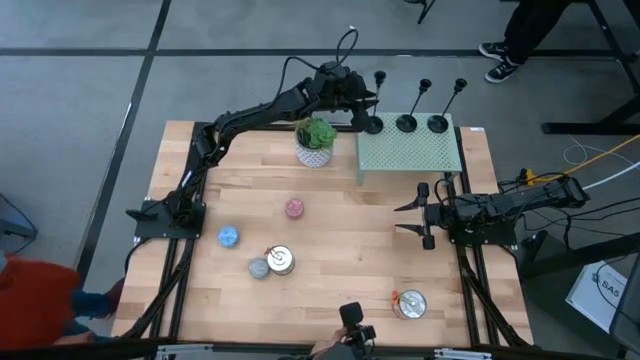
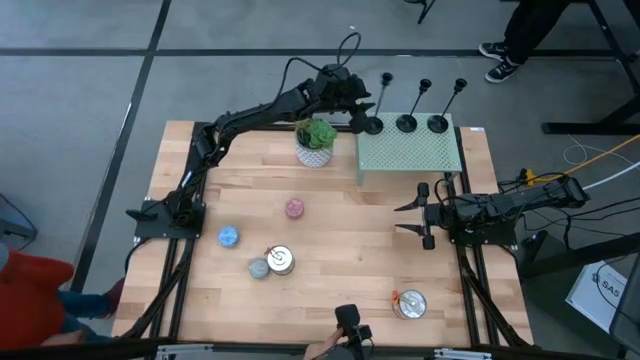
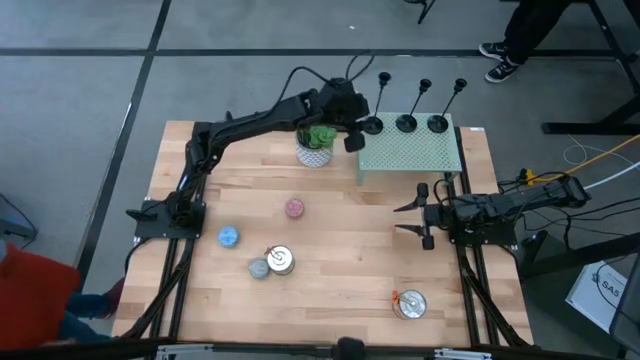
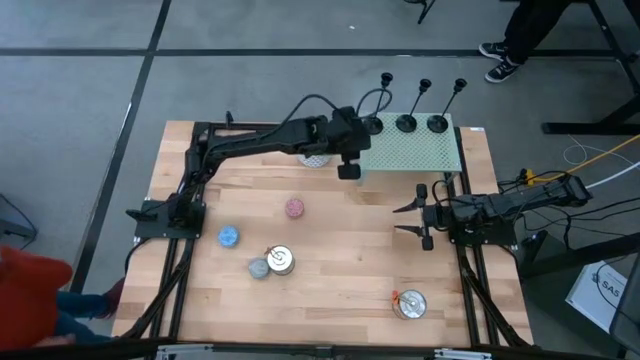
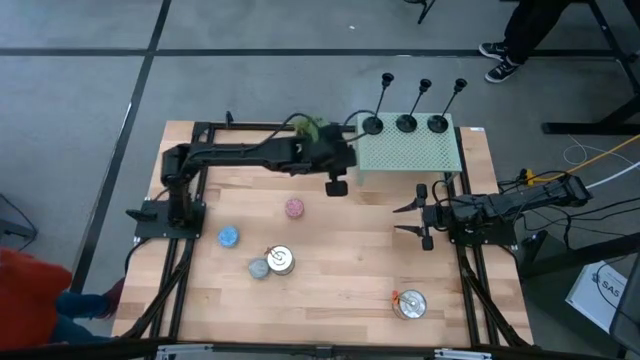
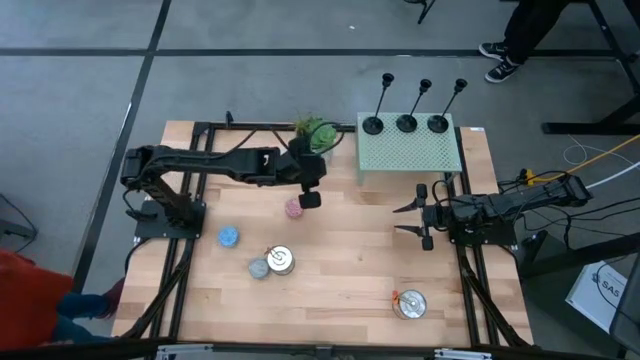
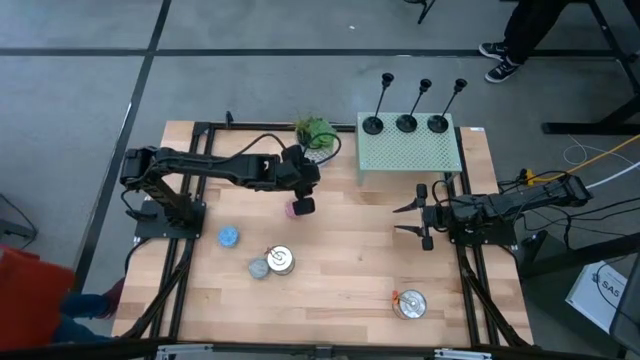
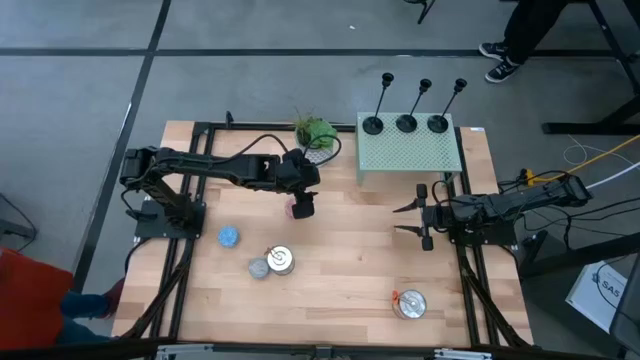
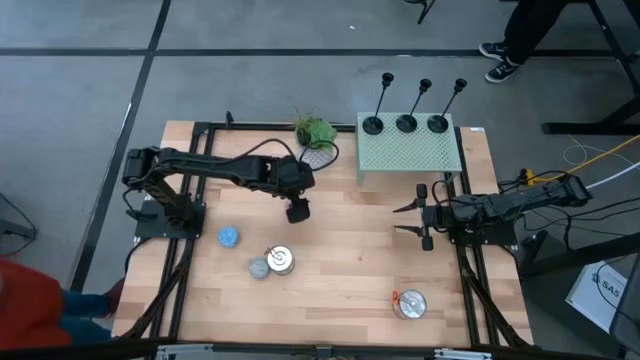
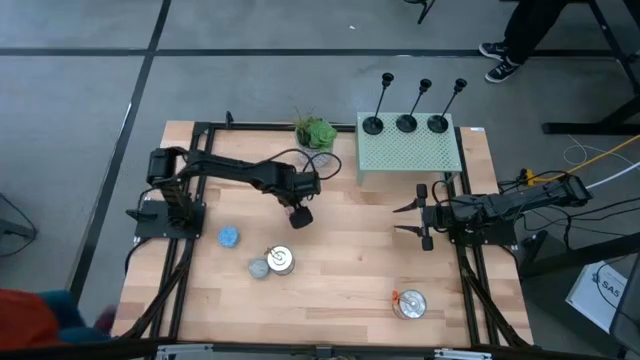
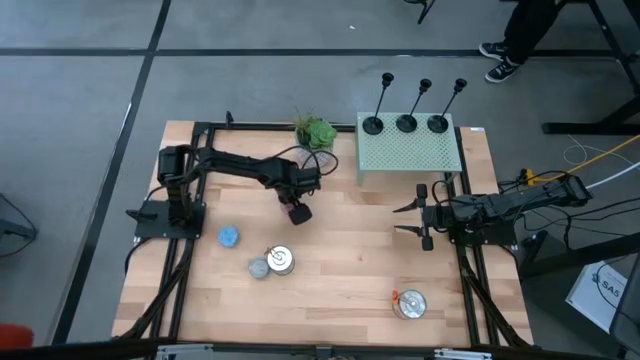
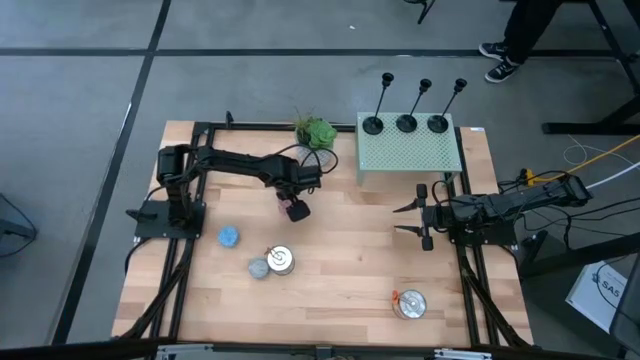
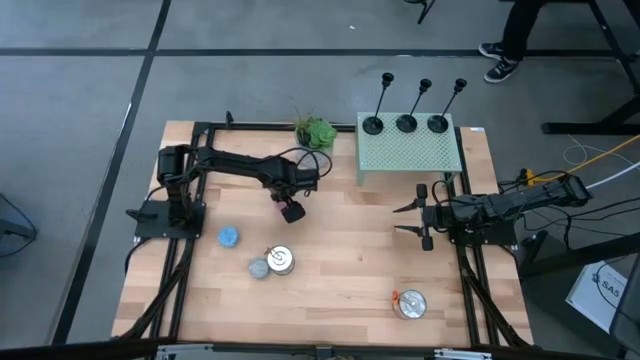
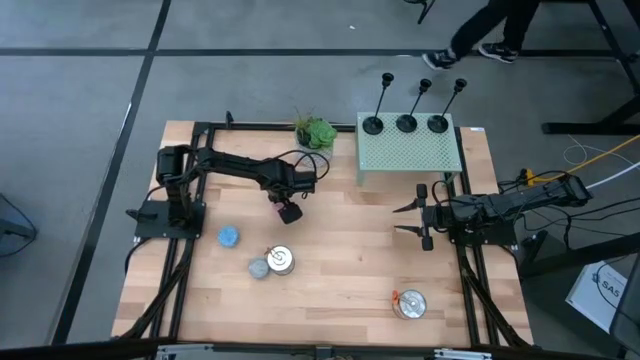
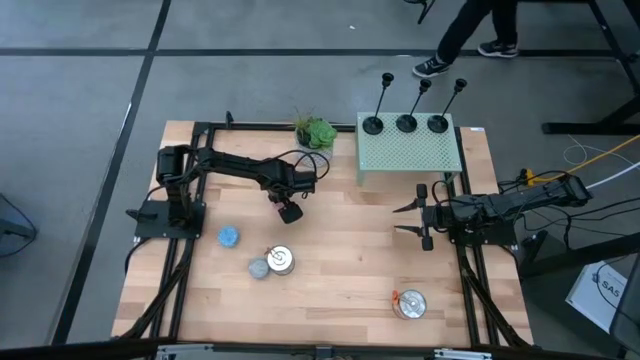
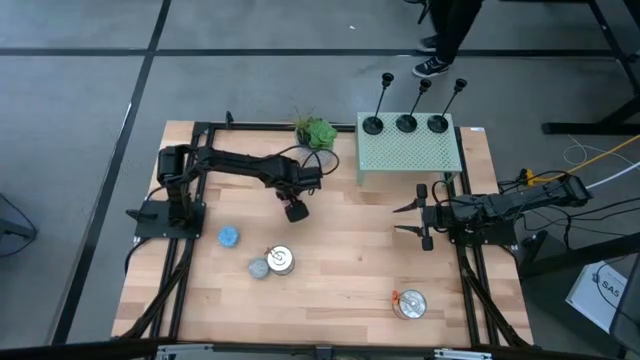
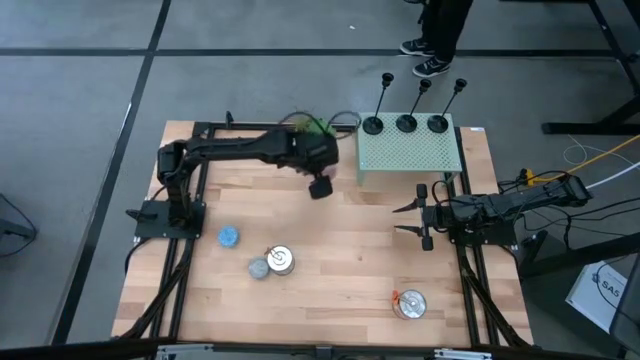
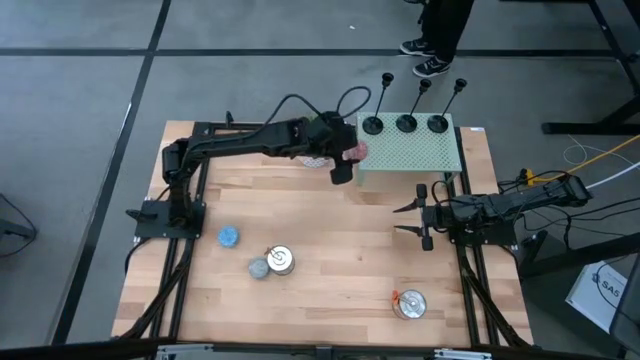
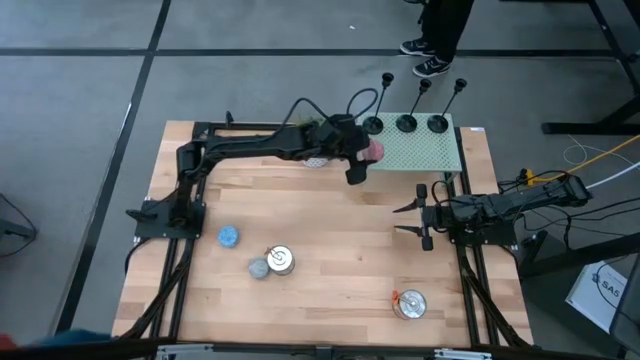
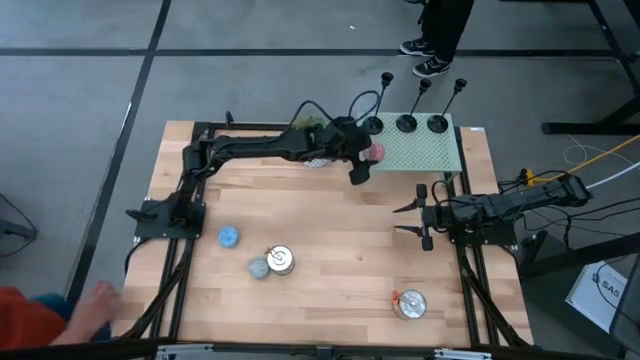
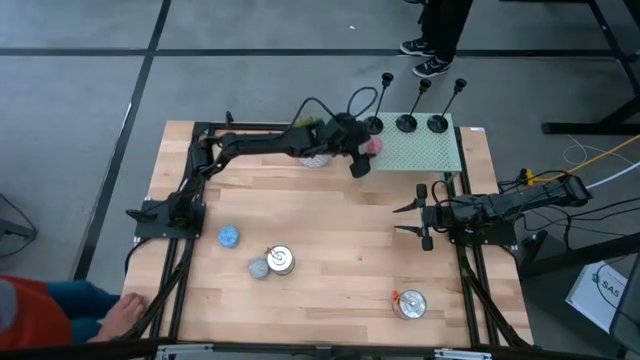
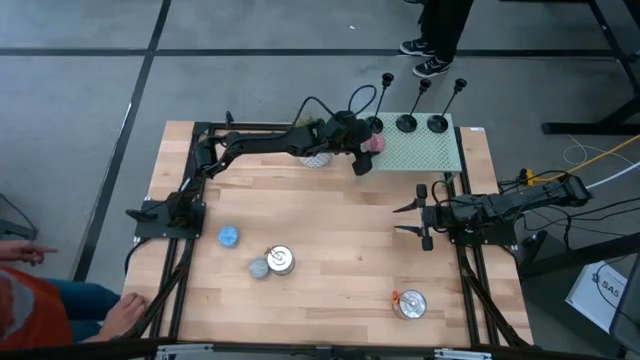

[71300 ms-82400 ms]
Task: Pick & Place candle stick holders
Put the red yellow scented candle on the shelf

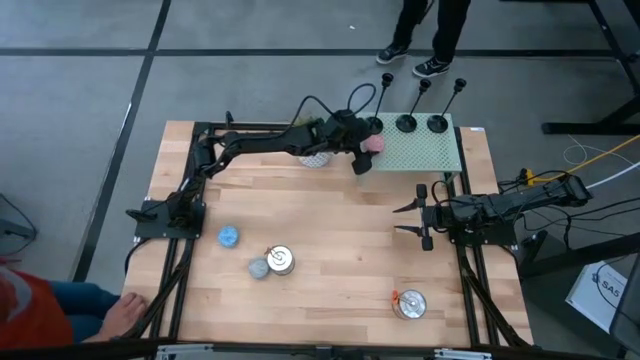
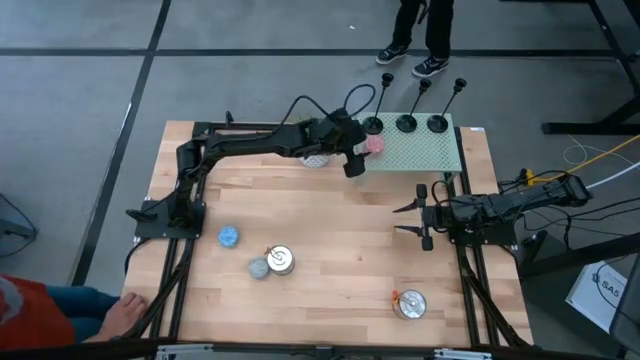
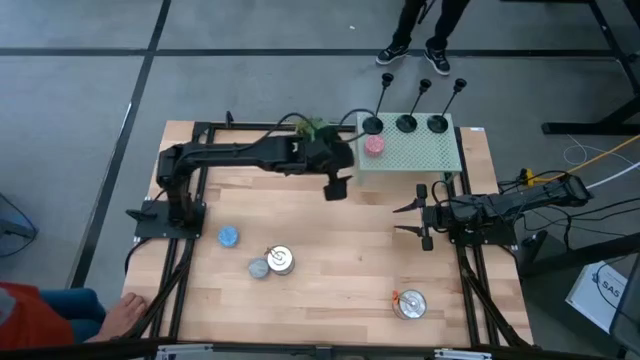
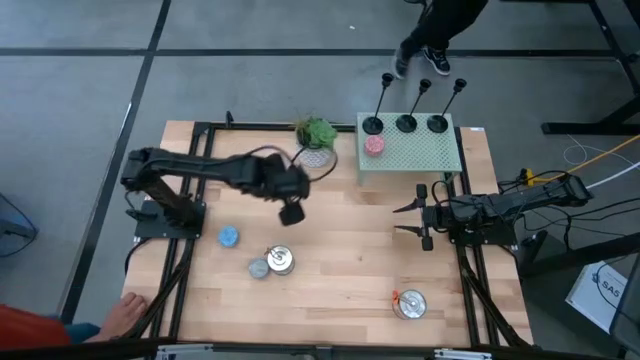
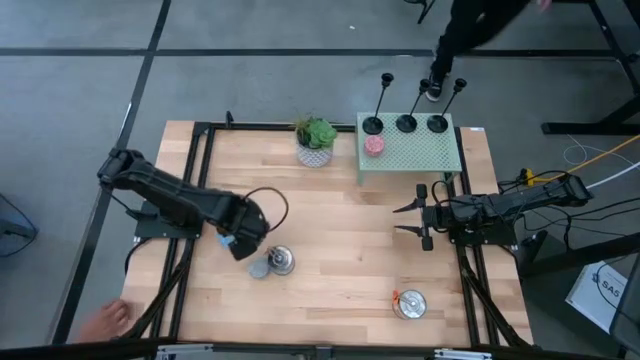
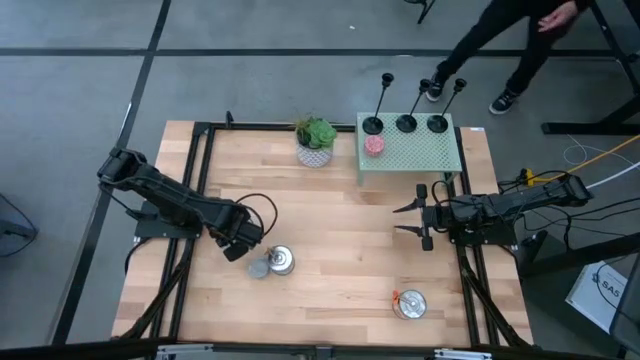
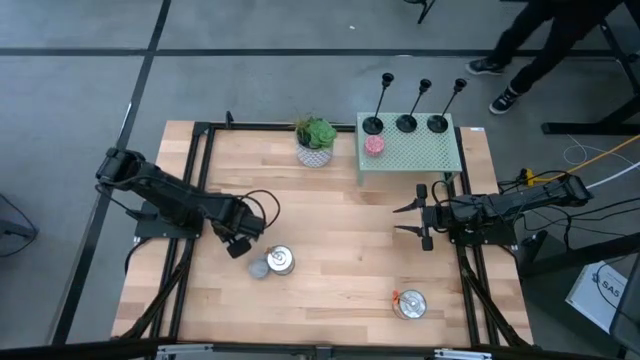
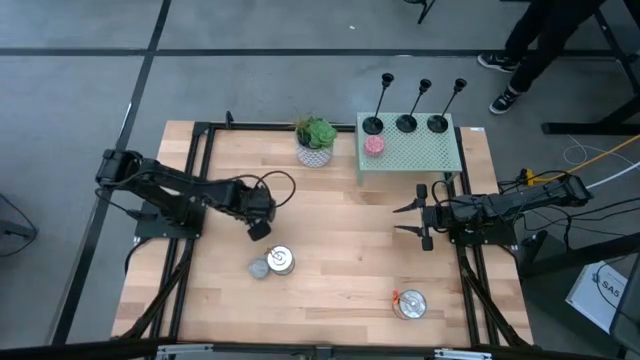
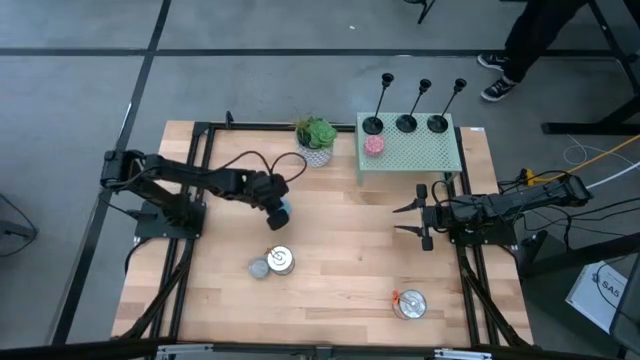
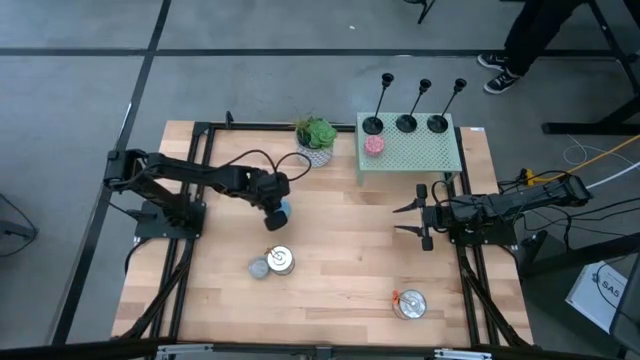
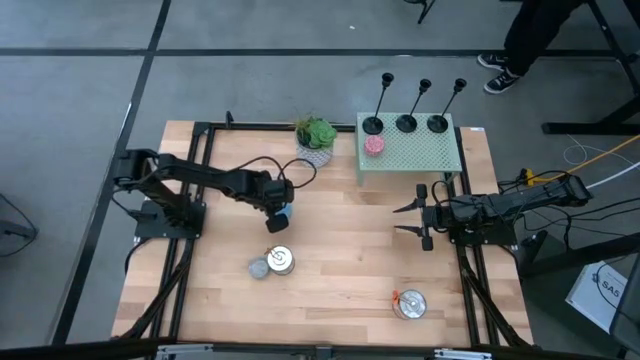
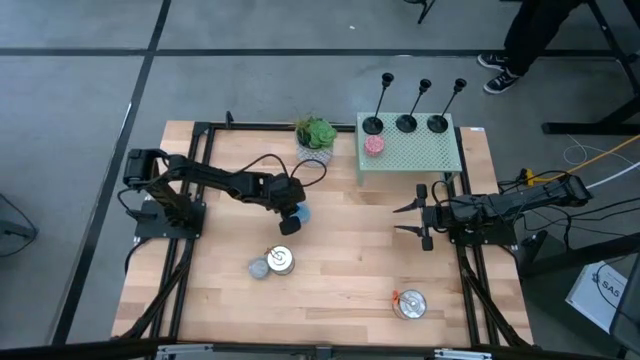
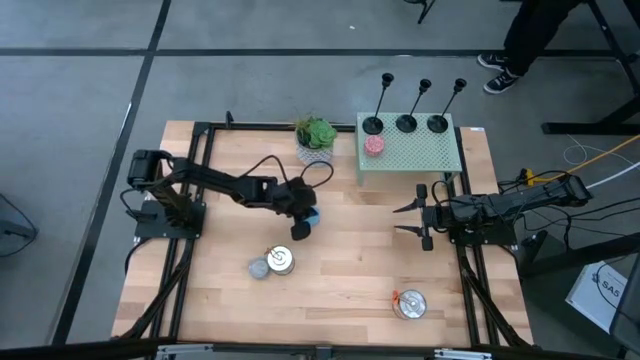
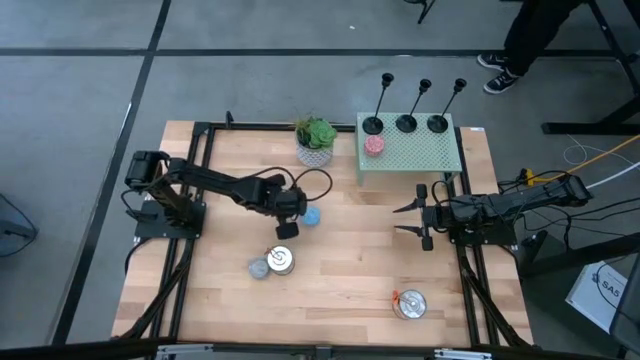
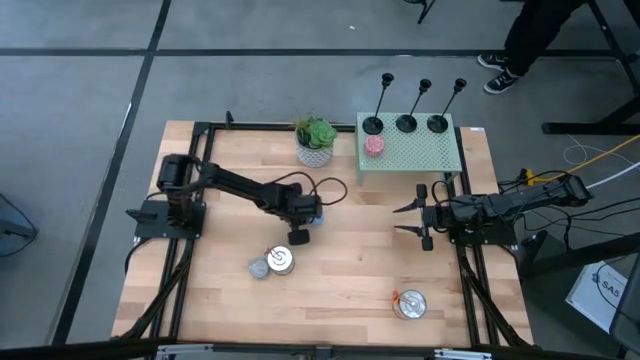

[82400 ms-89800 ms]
Move the blue white scented candle to the middle of the table

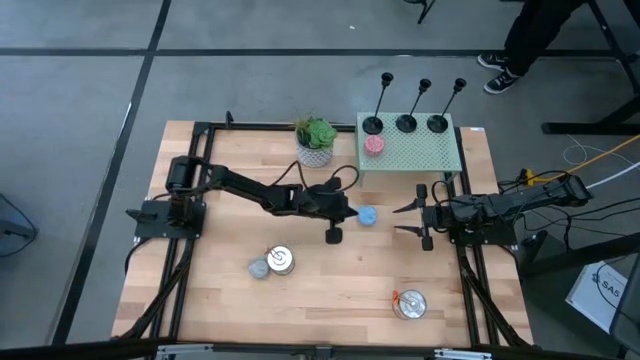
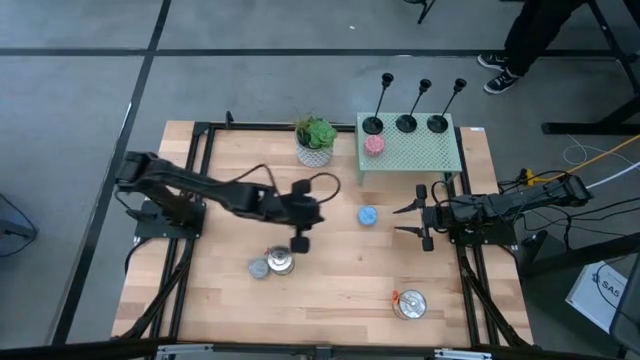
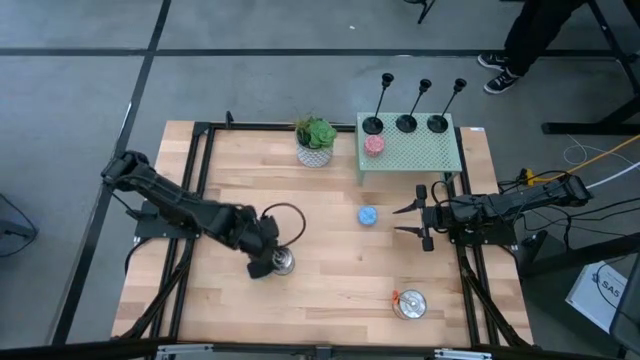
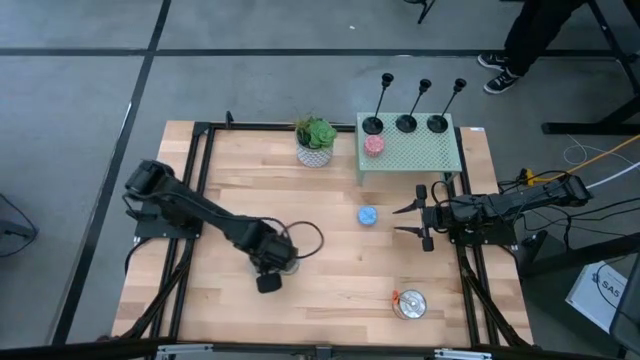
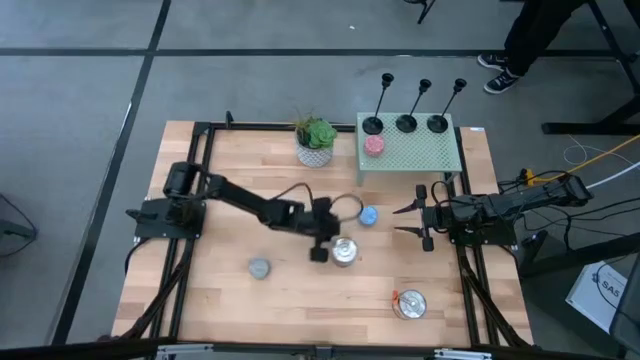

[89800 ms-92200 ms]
Move the left silver scented candle can to the middle of the table
